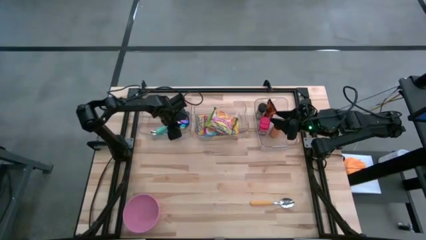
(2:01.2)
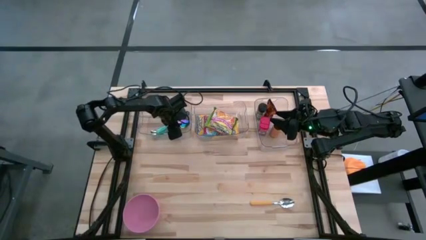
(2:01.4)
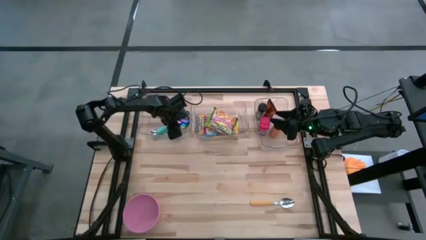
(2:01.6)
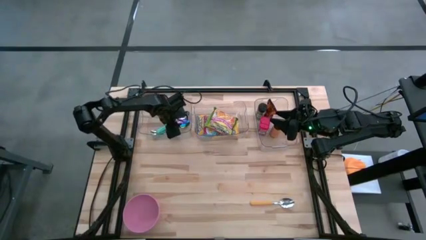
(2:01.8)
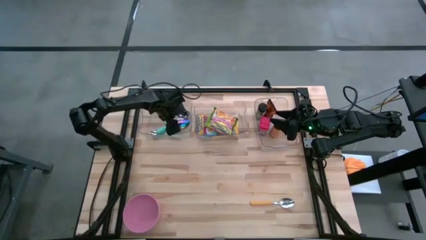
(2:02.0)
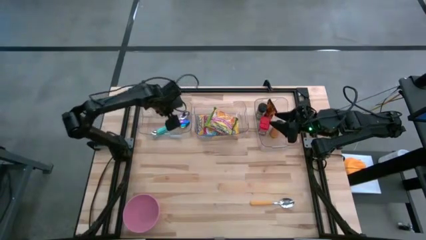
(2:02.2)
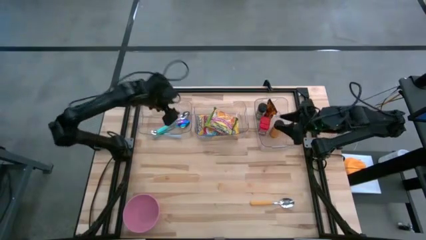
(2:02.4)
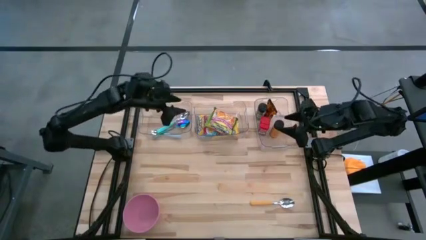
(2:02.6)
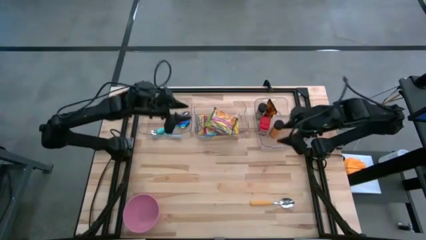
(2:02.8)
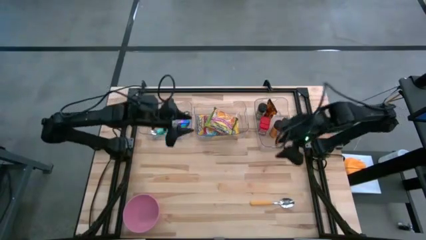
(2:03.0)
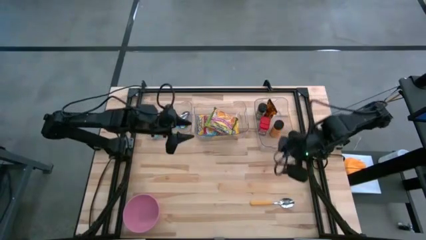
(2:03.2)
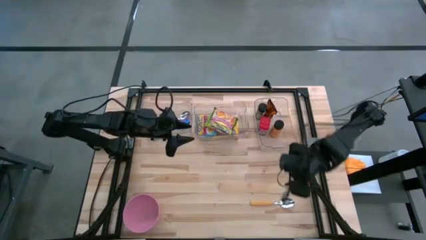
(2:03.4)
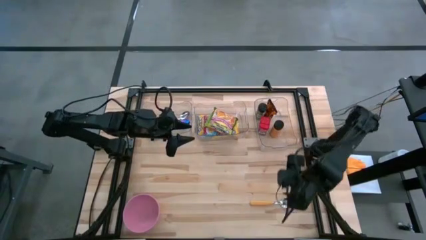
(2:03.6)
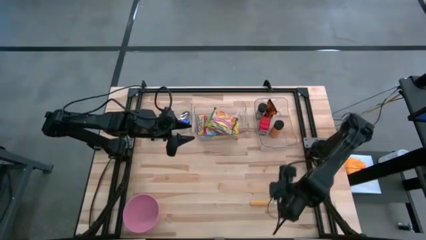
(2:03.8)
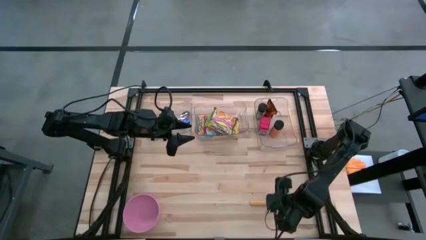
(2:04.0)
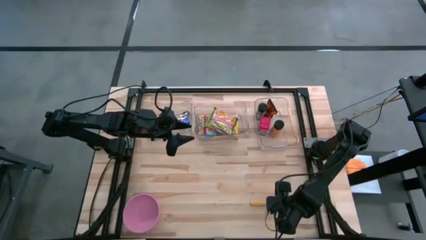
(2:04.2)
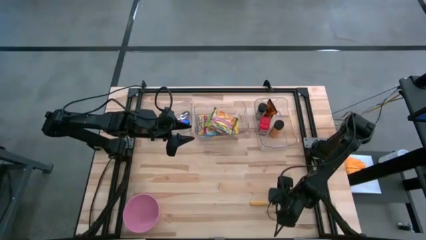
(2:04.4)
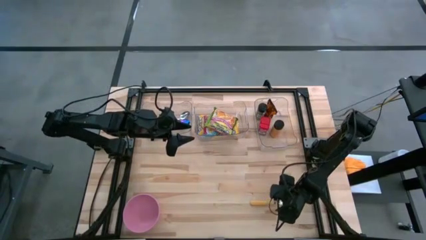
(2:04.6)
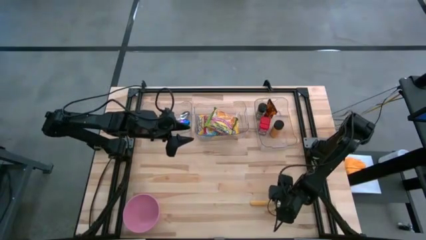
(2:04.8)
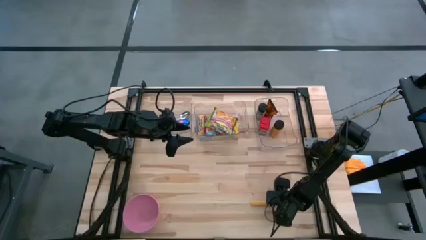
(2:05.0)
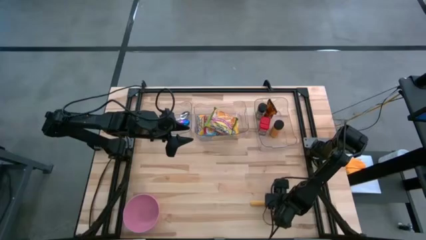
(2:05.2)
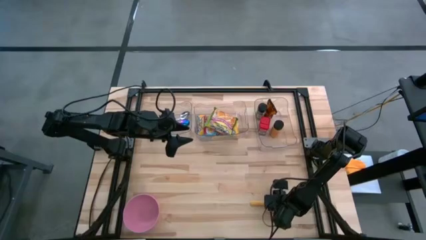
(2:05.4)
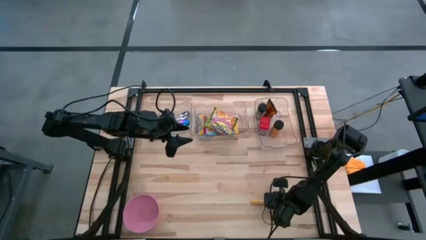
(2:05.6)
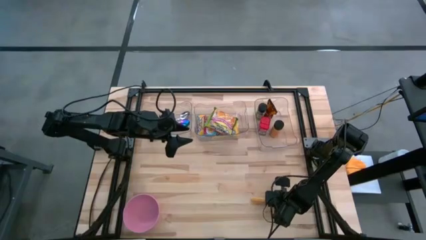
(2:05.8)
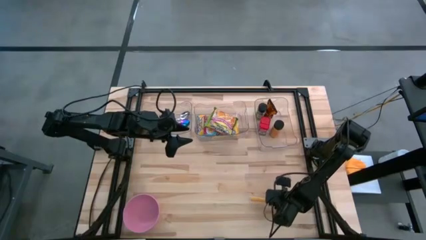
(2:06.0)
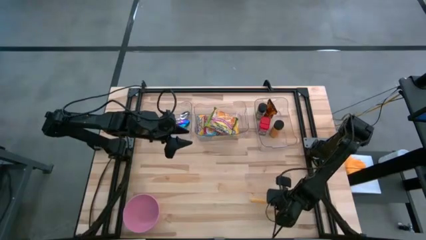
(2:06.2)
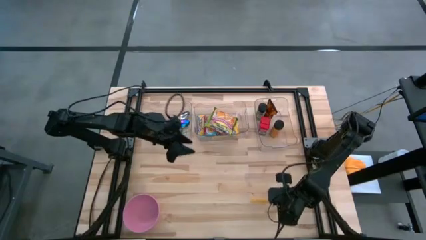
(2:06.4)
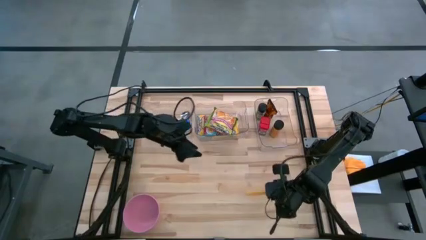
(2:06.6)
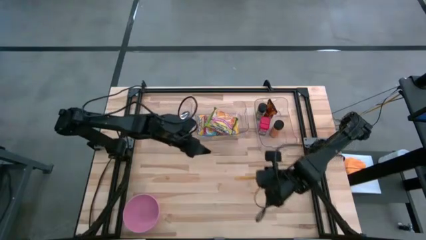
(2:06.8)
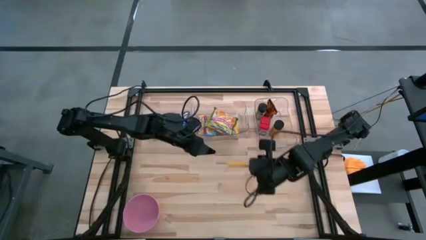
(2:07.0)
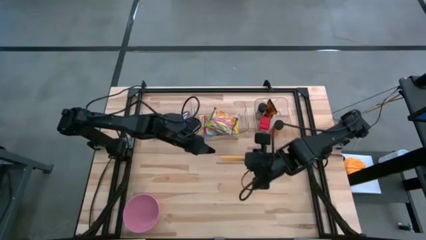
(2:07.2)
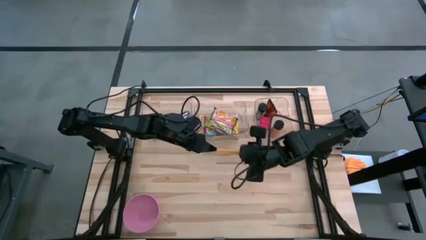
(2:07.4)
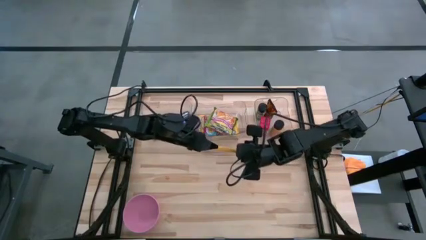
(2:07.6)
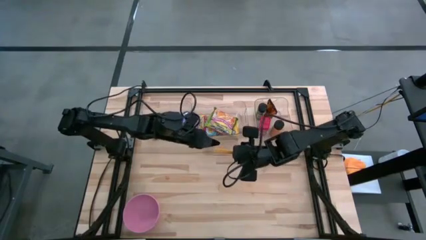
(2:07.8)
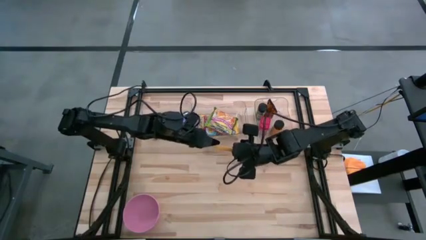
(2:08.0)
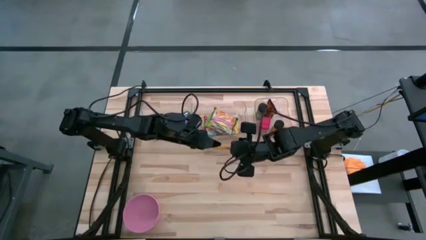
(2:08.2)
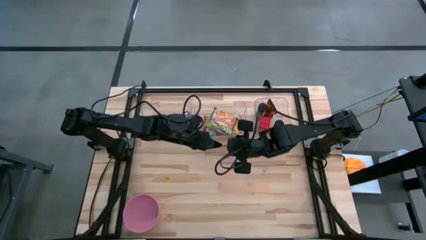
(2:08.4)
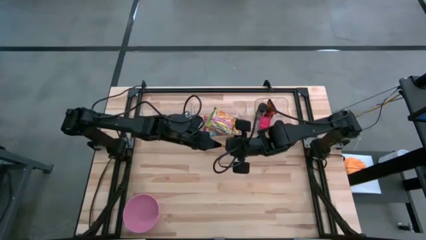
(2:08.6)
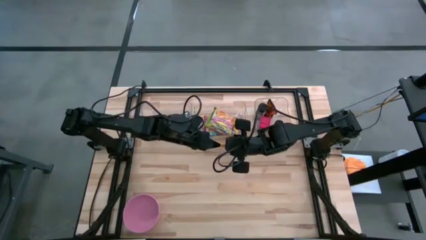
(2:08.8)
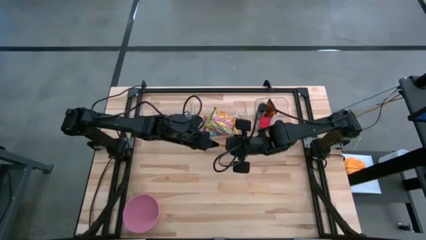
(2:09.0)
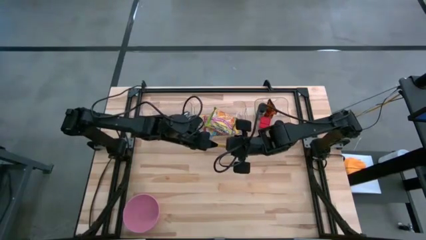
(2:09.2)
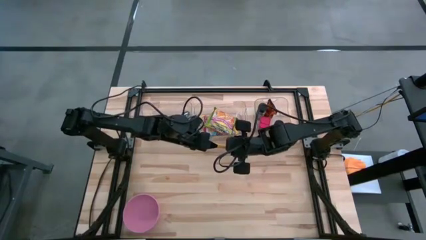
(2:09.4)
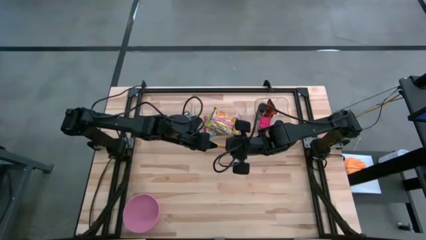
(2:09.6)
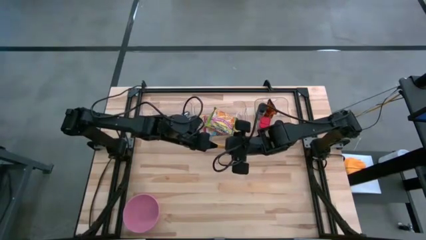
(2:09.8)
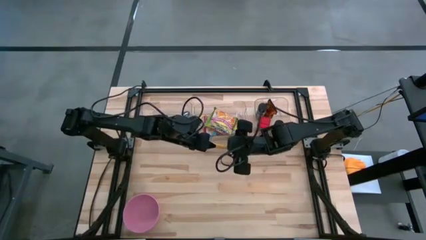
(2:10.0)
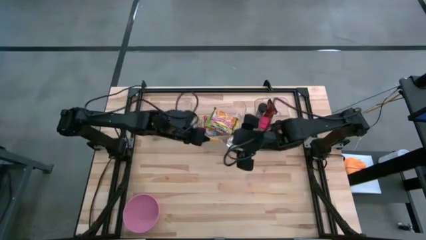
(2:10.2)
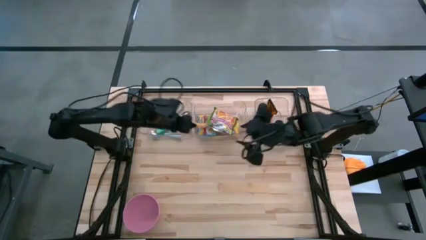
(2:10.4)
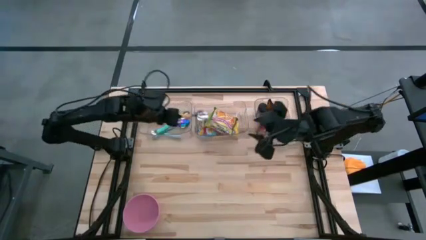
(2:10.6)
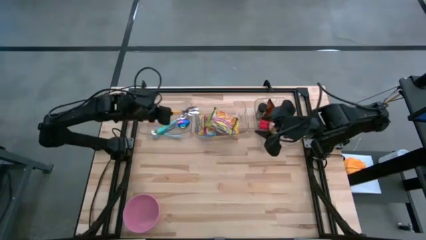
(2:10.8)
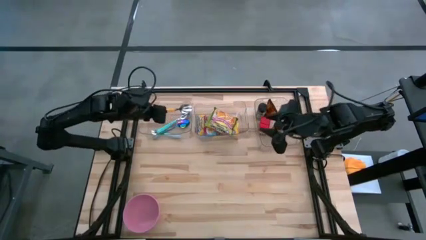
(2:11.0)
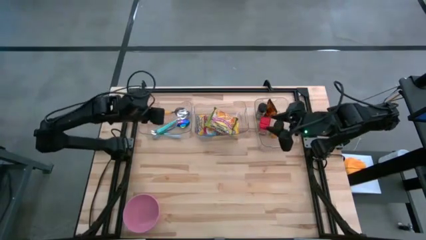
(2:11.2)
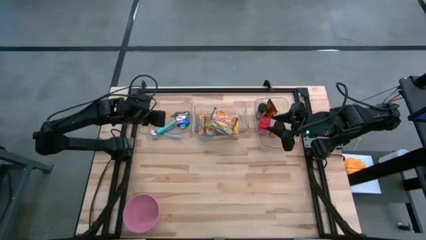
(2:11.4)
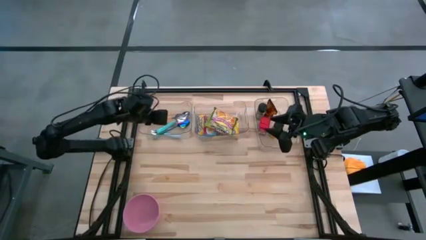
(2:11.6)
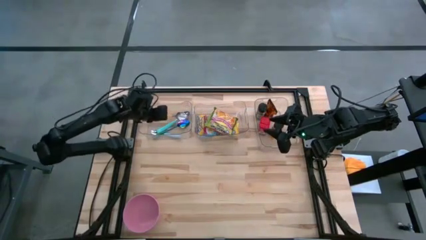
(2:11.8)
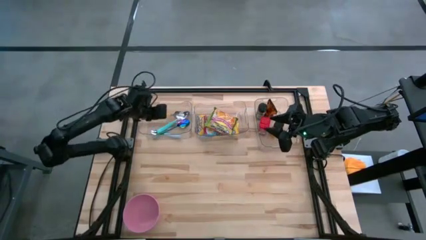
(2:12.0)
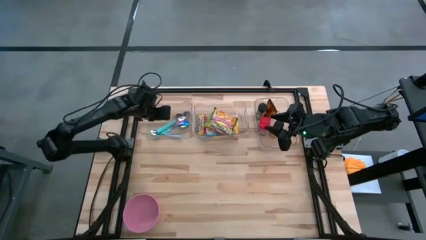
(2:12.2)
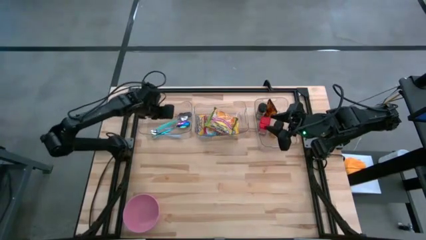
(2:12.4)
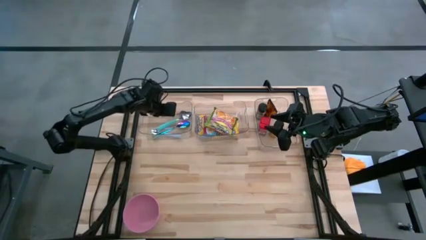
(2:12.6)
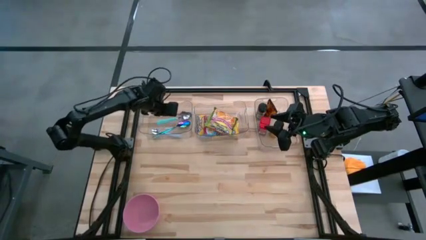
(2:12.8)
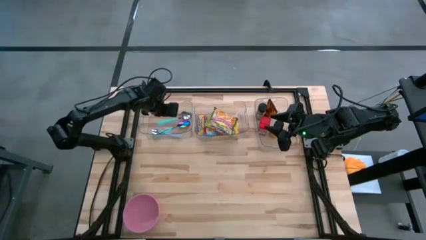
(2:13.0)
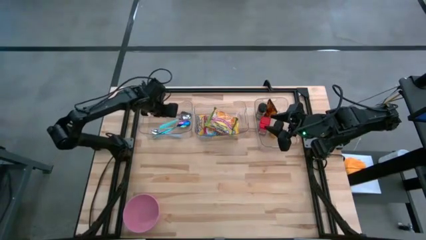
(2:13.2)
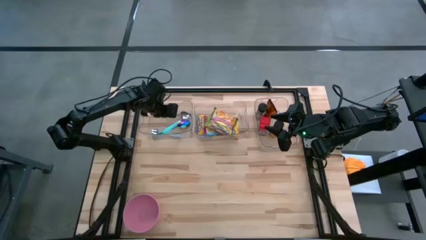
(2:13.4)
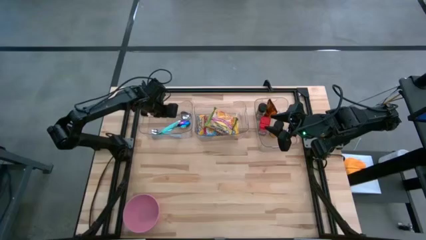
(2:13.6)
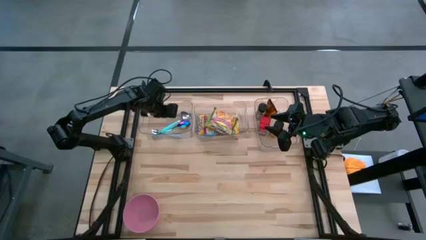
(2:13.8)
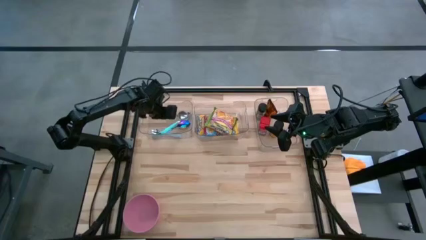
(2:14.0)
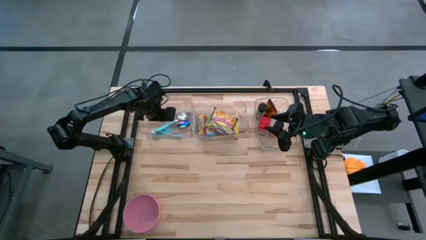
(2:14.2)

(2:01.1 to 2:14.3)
Put the yellow spoon into the left transparent bin
